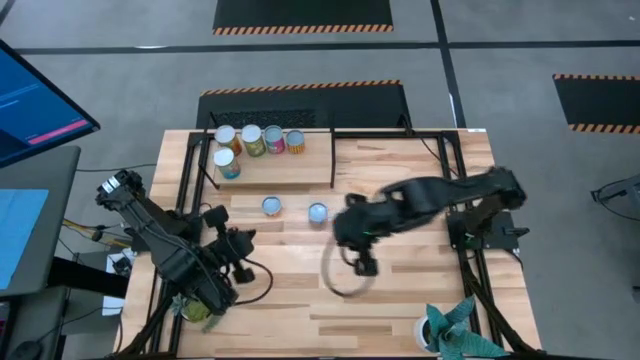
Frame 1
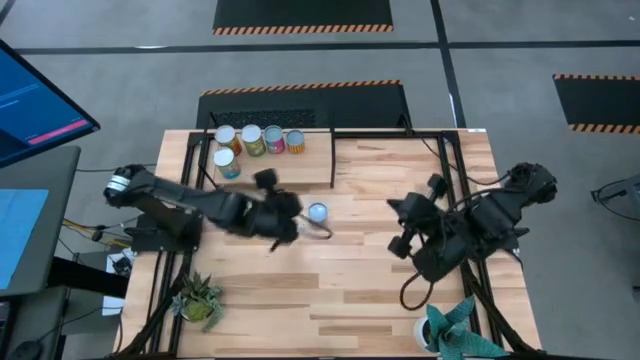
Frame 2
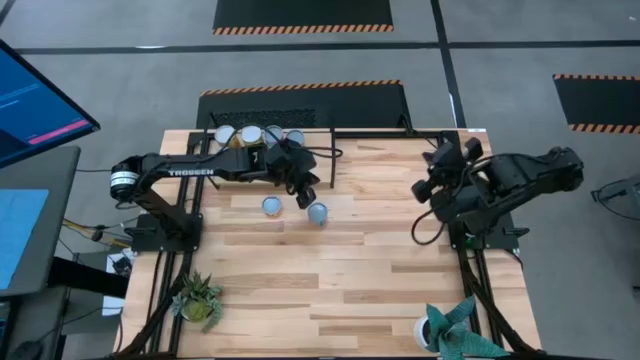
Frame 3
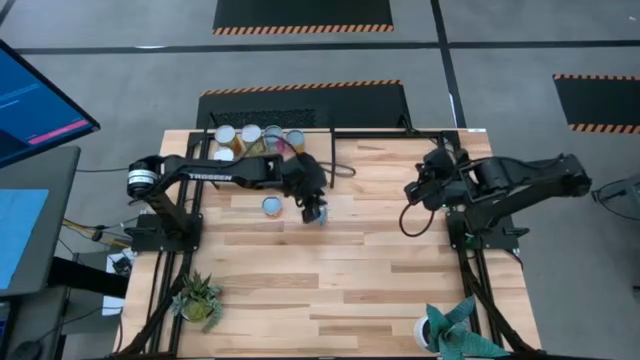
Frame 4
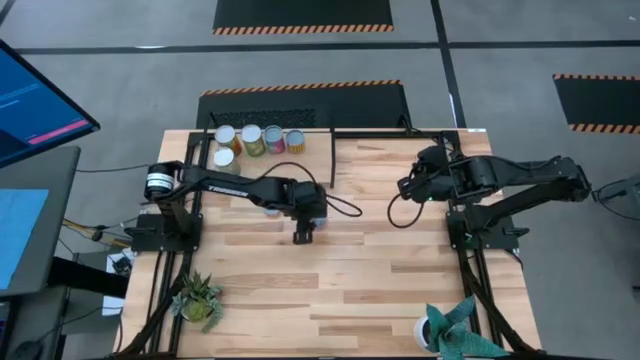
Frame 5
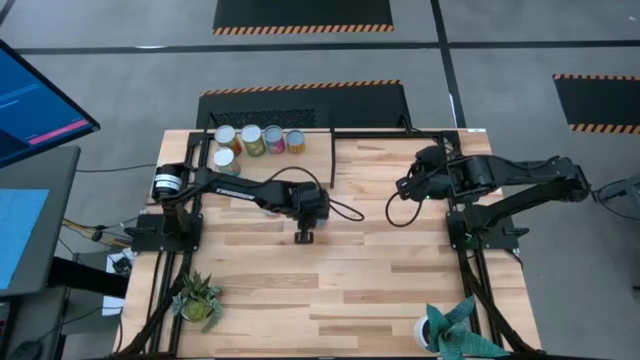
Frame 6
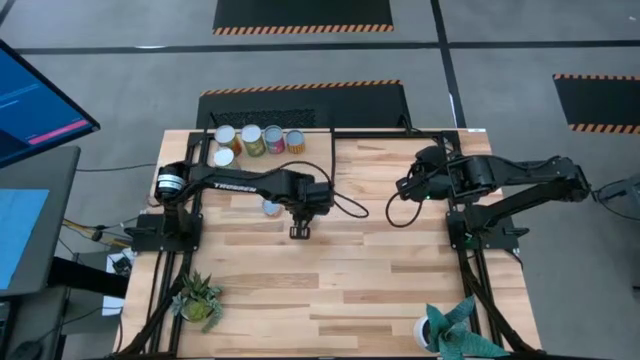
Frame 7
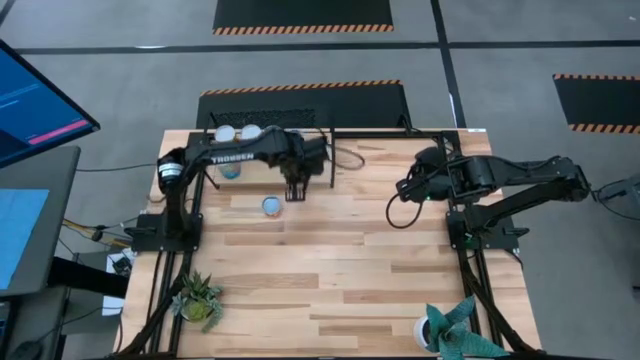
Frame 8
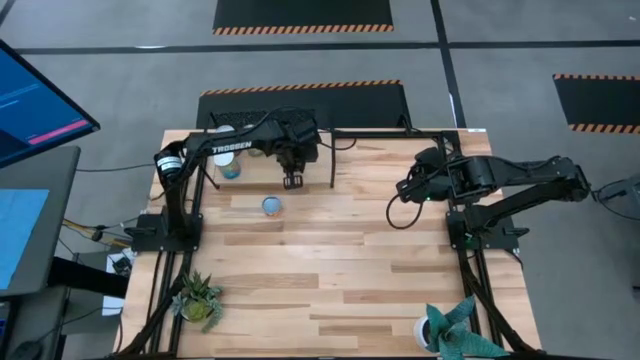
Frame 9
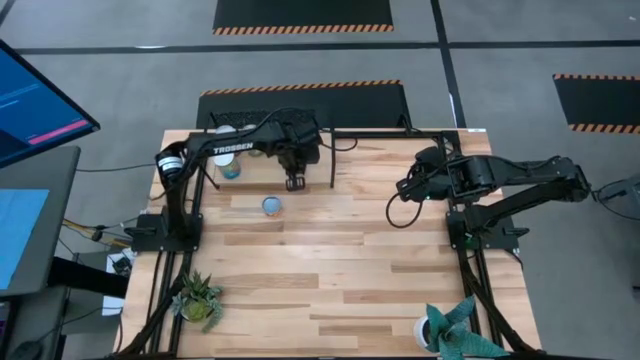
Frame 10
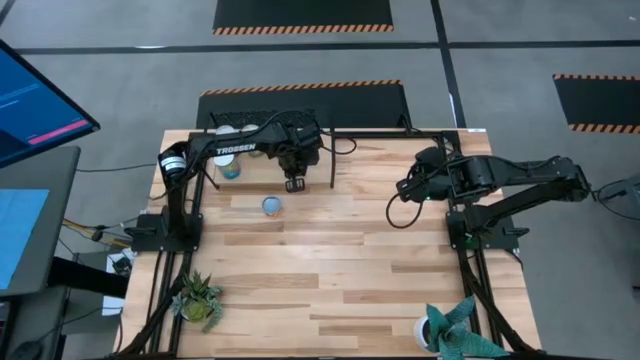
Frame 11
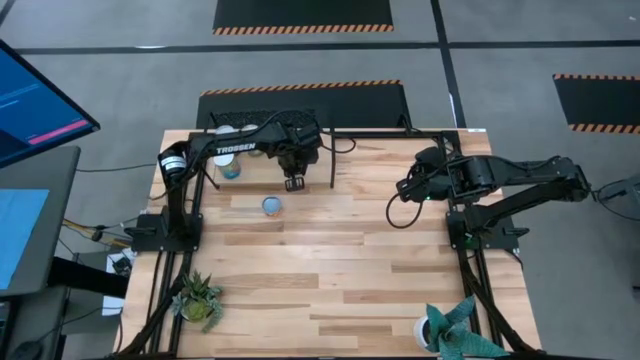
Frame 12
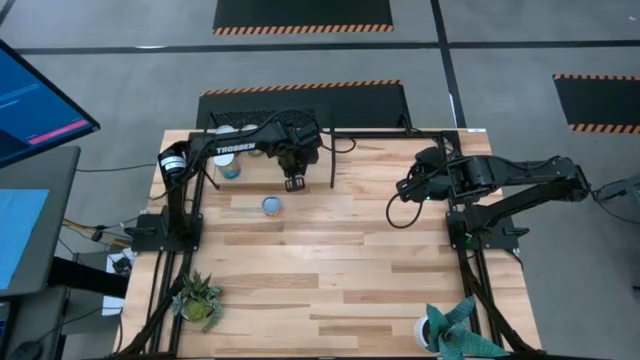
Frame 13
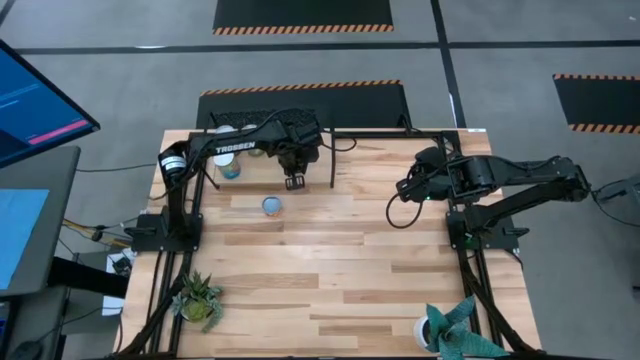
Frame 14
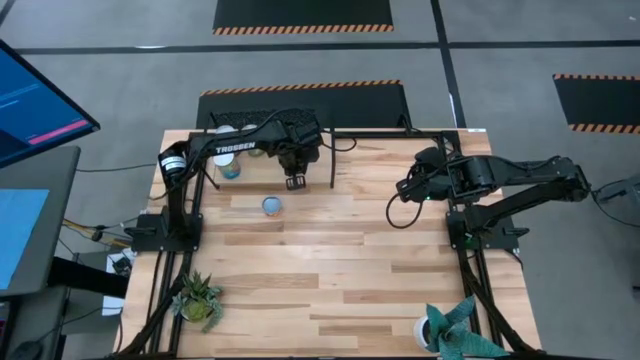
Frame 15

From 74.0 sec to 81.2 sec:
Task: Pick and place cans onto a shelf
Put the corn can on the shelf aligned with the yellow can

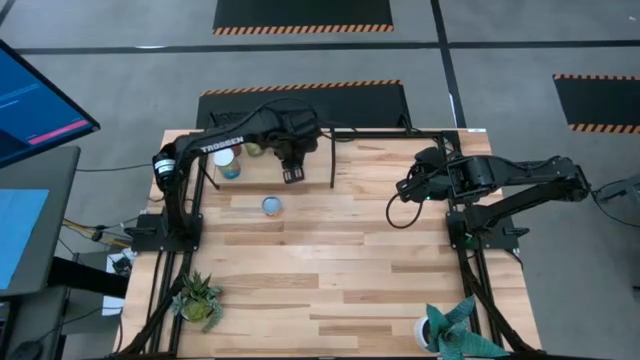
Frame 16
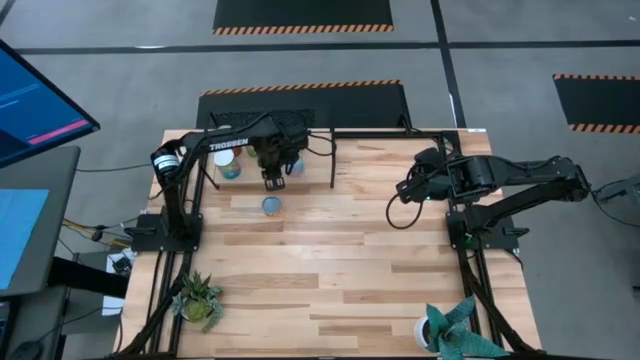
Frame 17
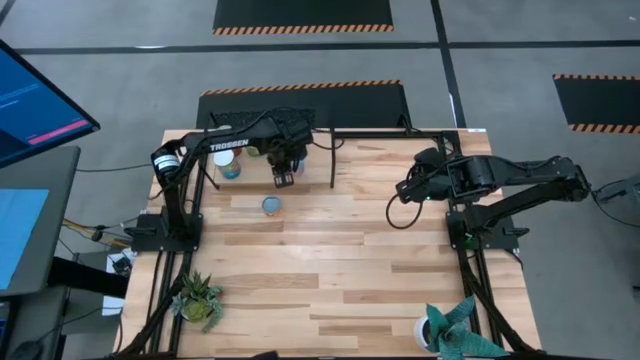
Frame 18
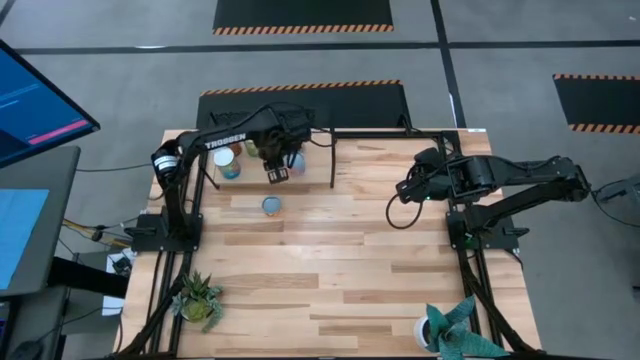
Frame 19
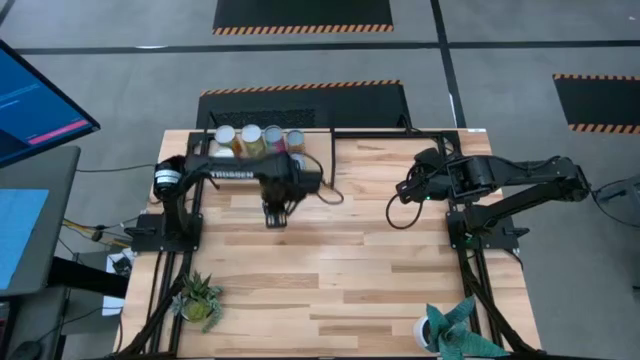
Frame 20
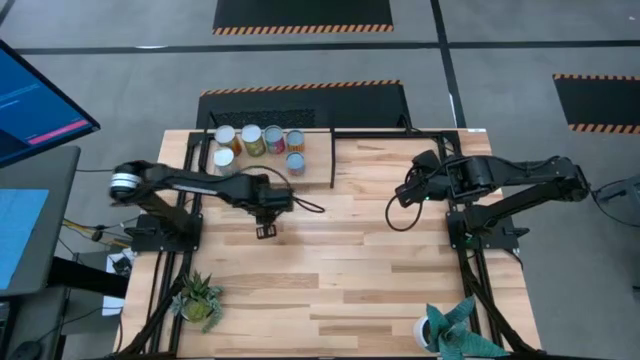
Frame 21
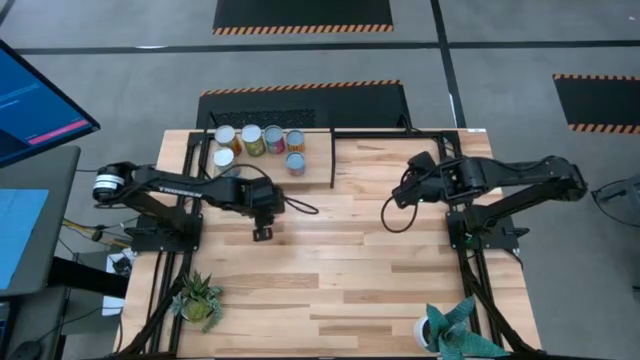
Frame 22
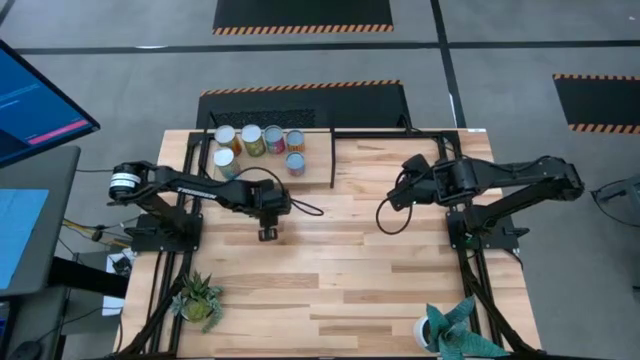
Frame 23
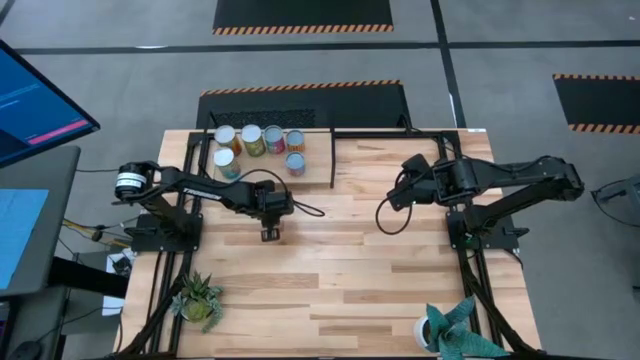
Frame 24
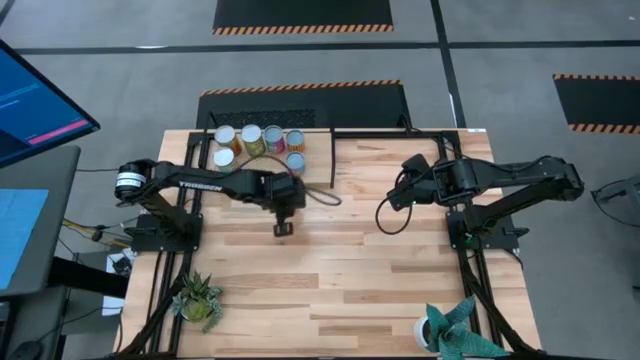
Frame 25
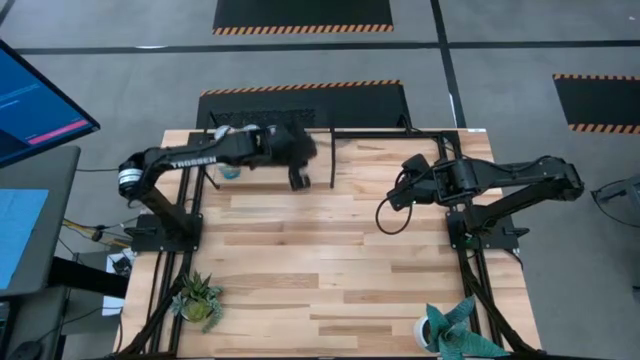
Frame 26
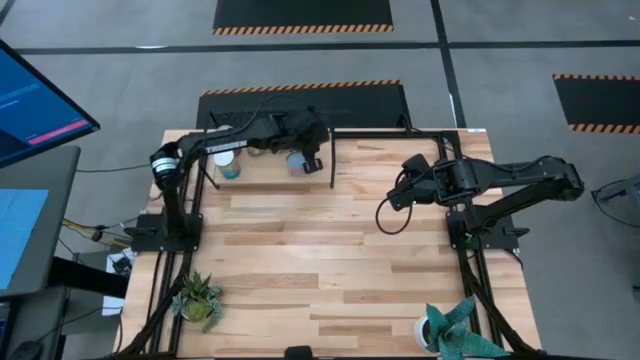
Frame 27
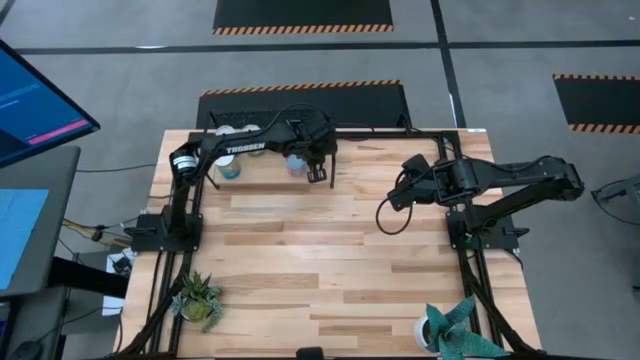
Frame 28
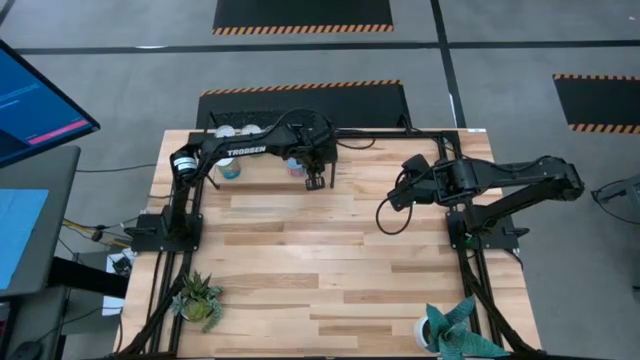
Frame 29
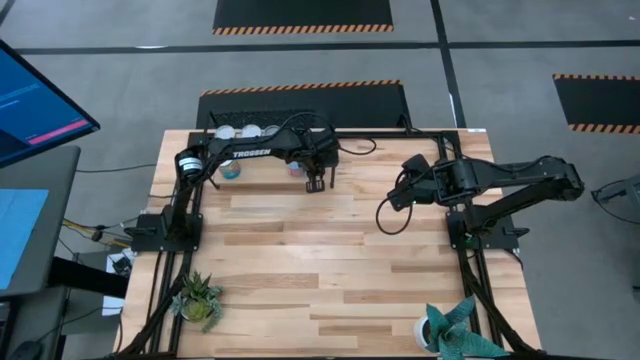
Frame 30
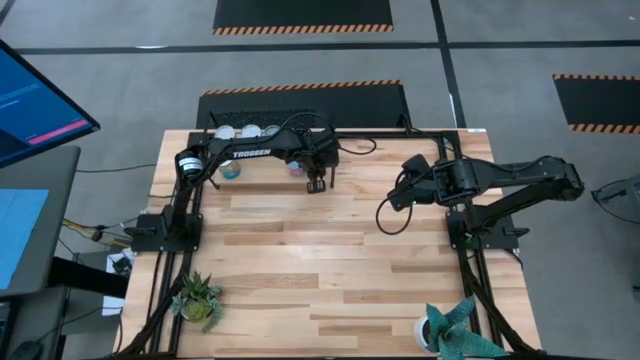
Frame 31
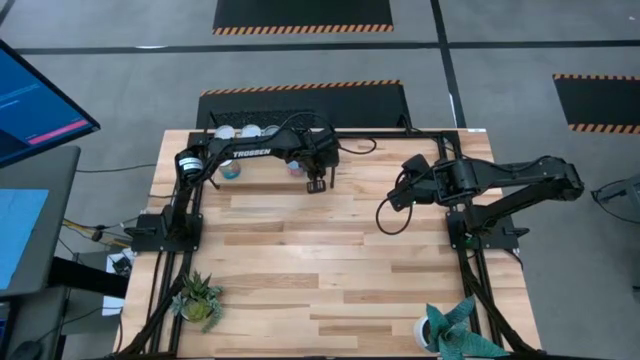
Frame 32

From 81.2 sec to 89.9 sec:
Put the pineapple rings can on the shelf aligned with the corn can

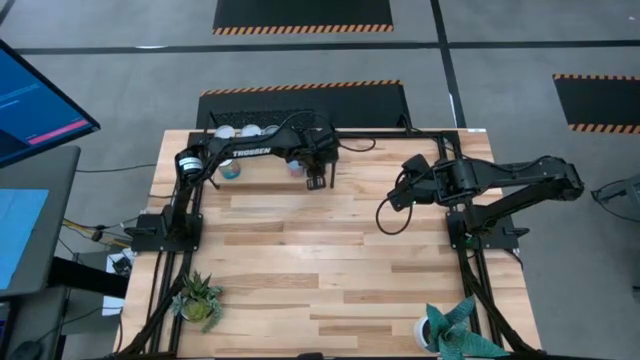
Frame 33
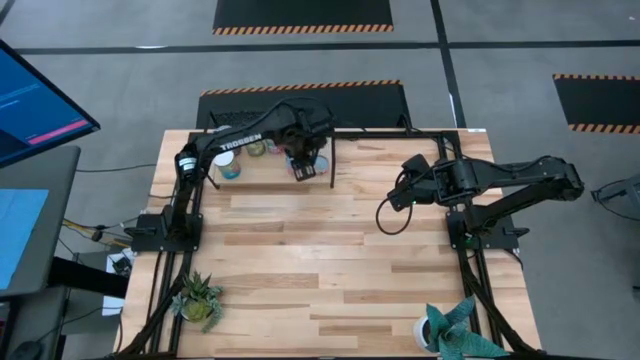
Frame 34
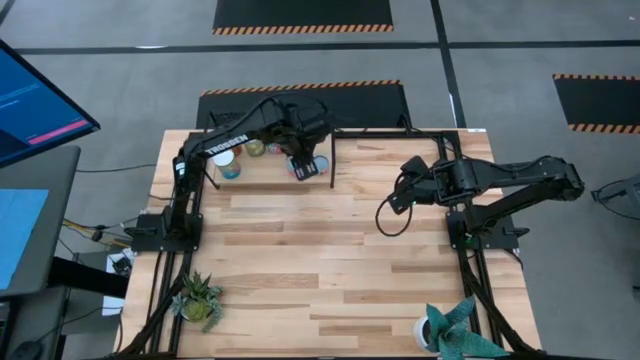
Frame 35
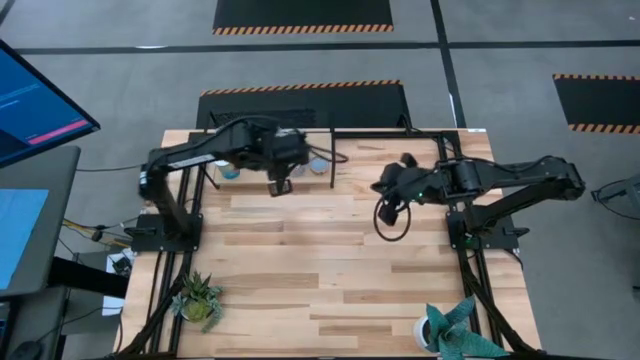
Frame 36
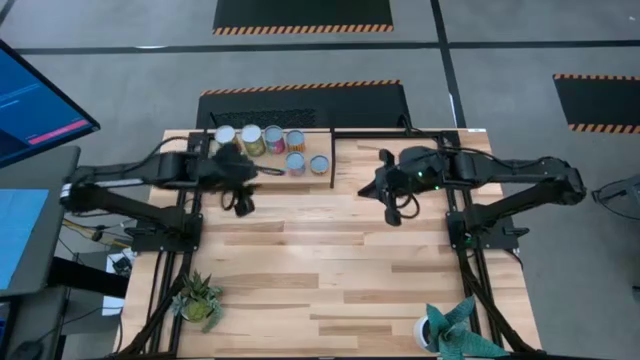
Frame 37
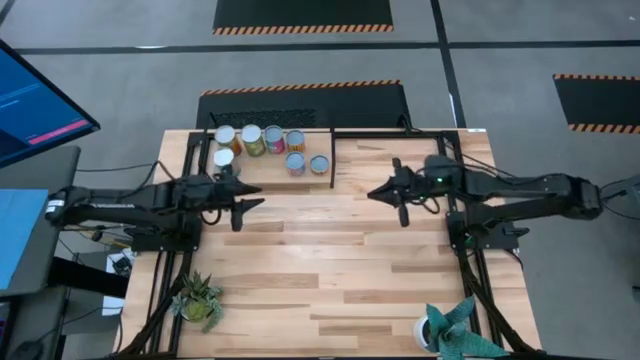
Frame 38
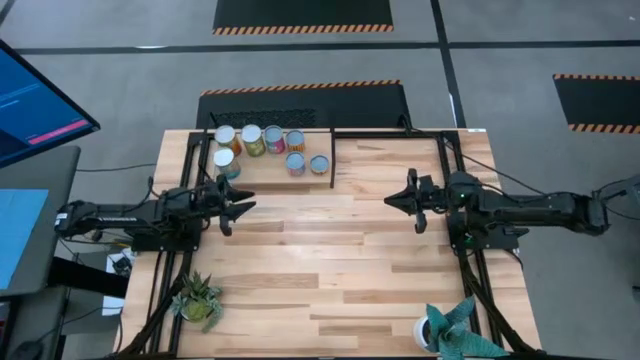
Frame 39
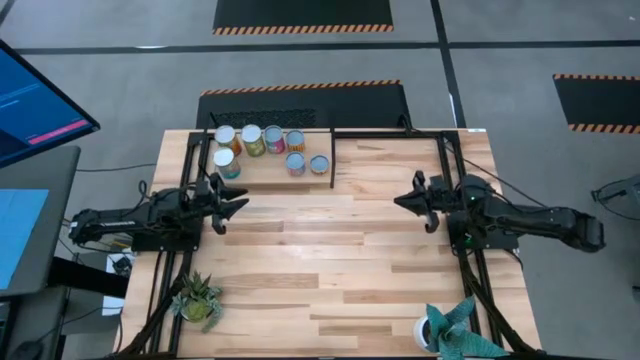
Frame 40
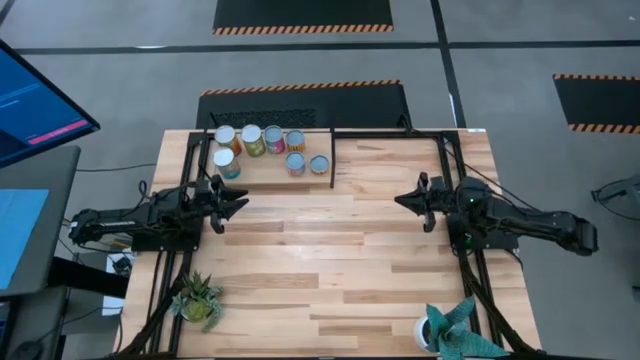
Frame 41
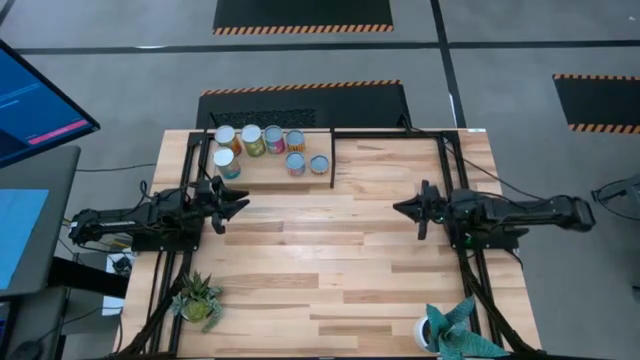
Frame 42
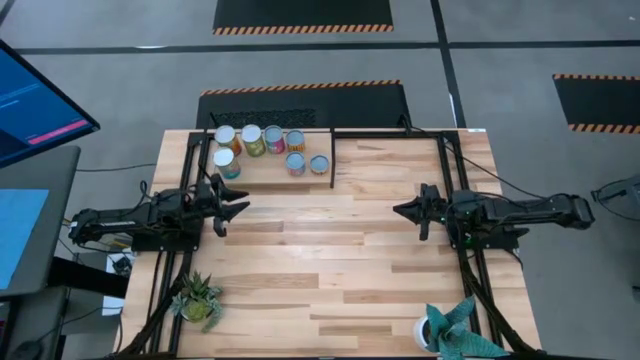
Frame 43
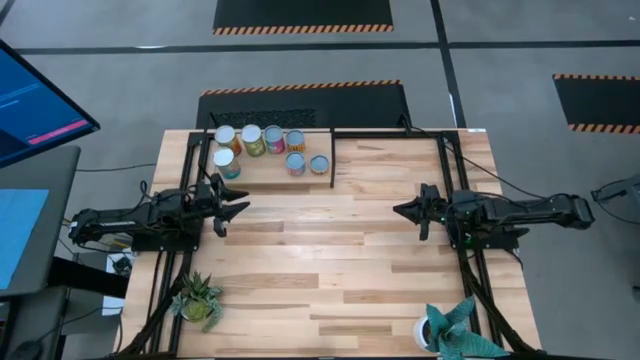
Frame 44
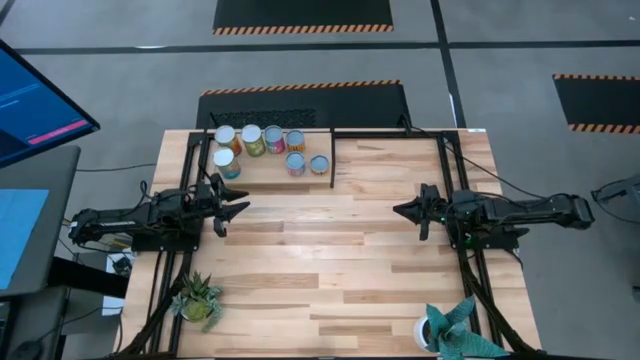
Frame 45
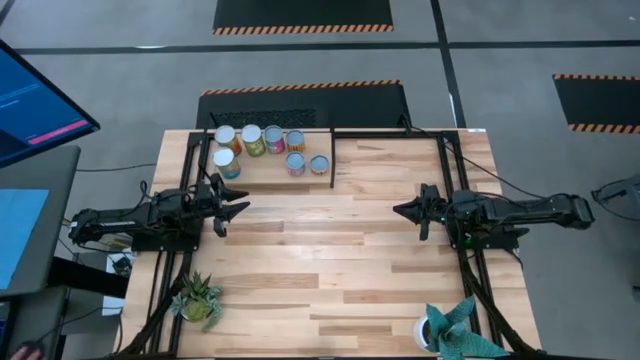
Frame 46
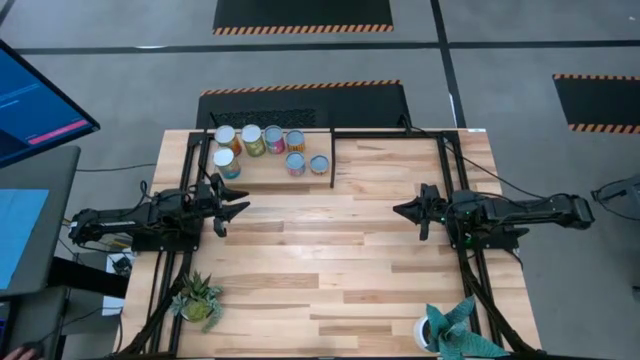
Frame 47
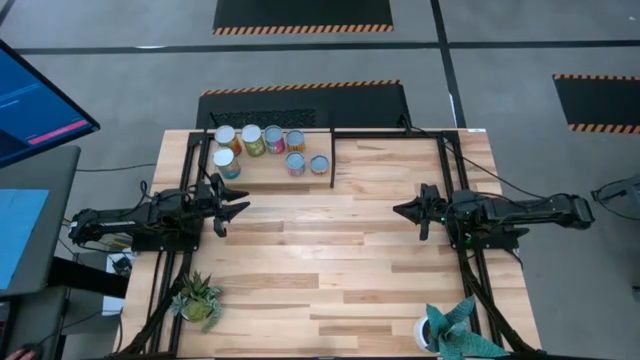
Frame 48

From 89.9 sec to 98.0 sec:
Return to Home Position
